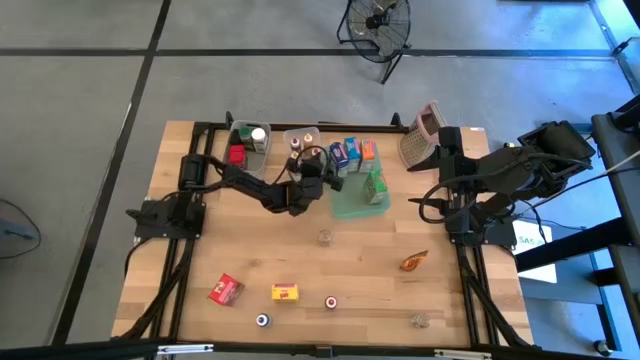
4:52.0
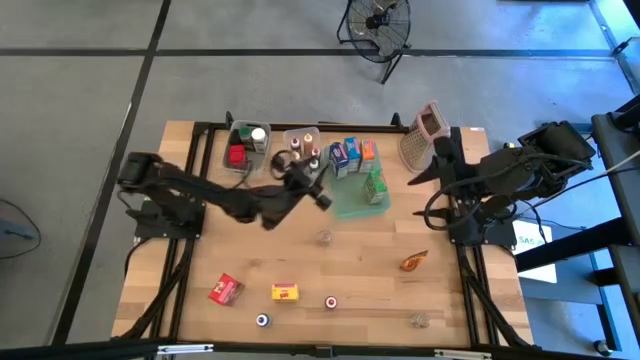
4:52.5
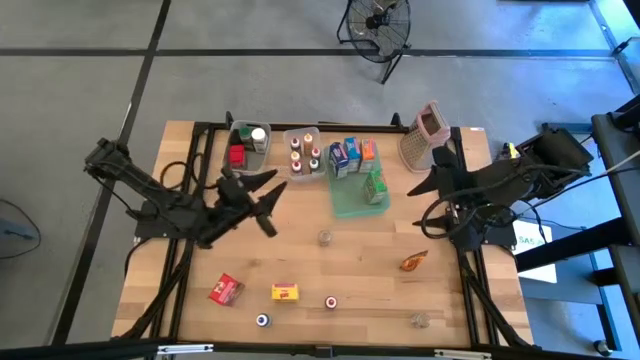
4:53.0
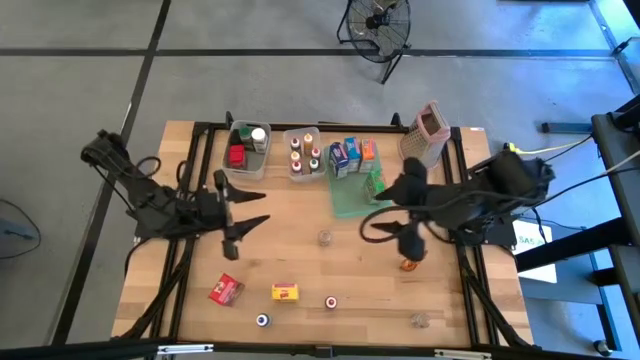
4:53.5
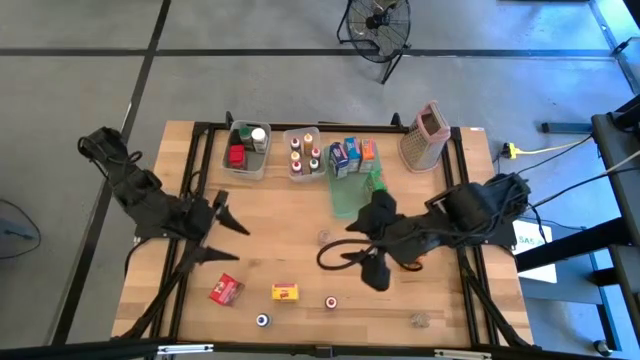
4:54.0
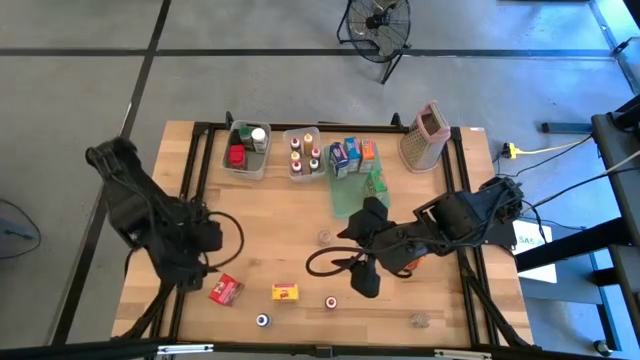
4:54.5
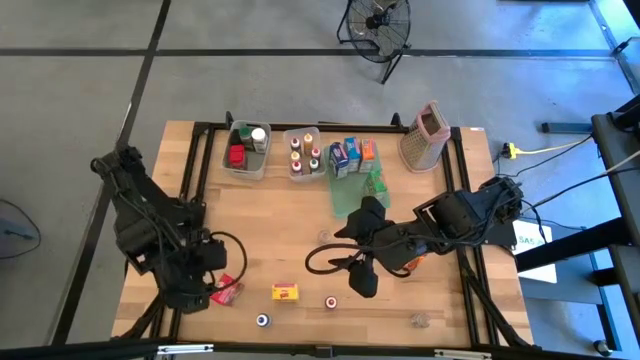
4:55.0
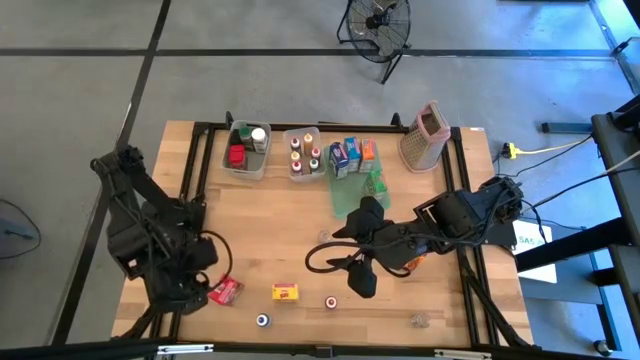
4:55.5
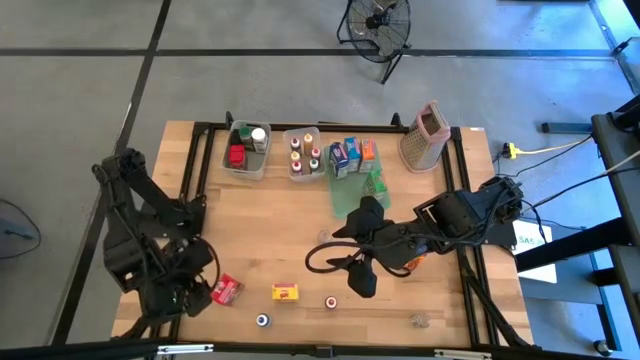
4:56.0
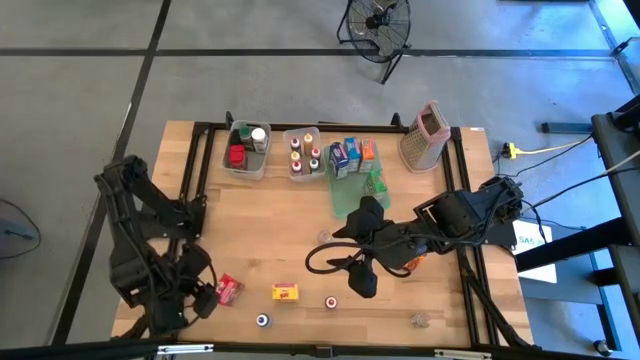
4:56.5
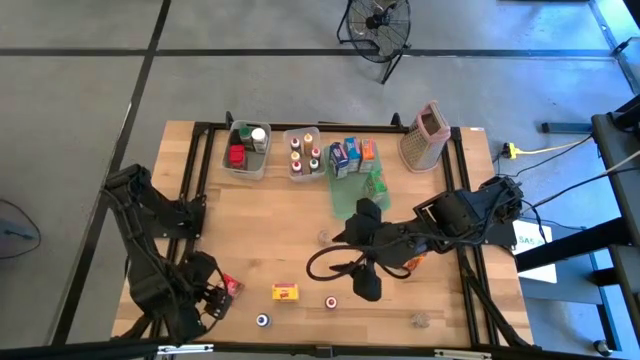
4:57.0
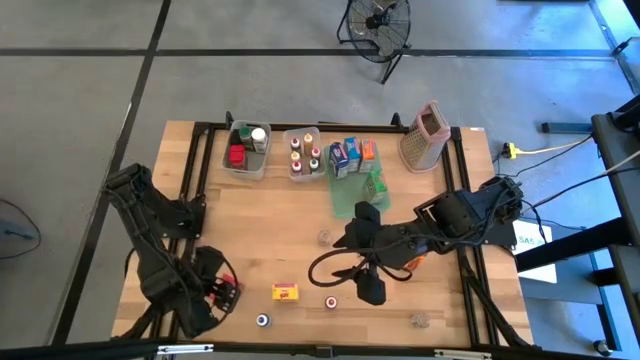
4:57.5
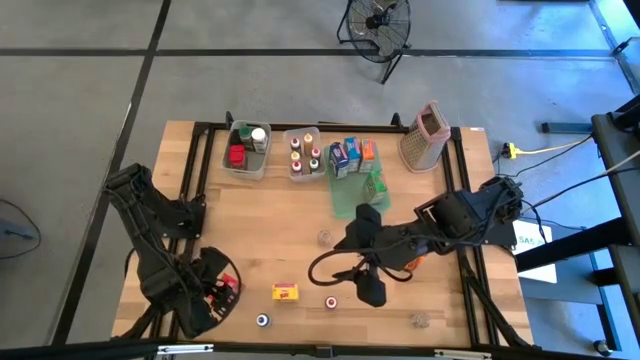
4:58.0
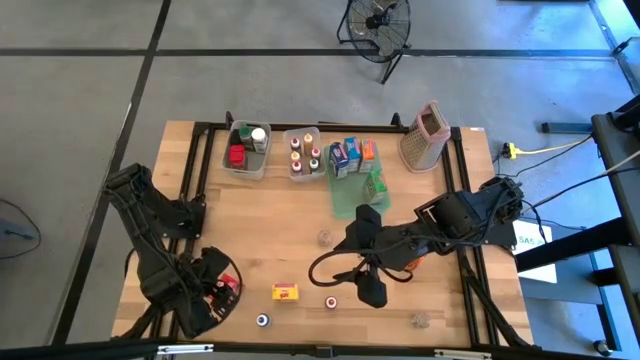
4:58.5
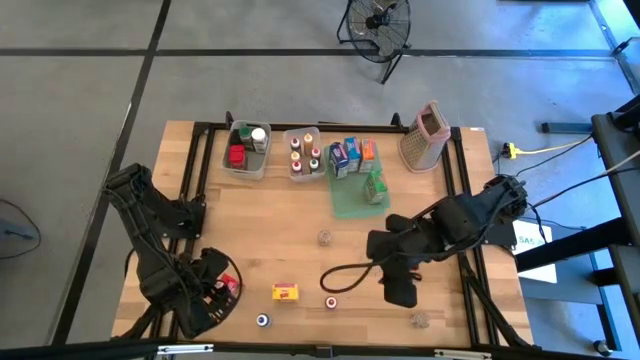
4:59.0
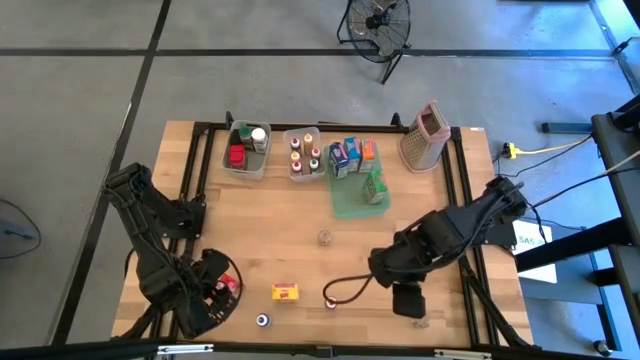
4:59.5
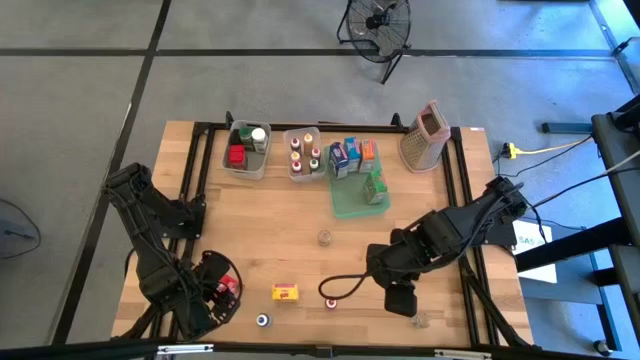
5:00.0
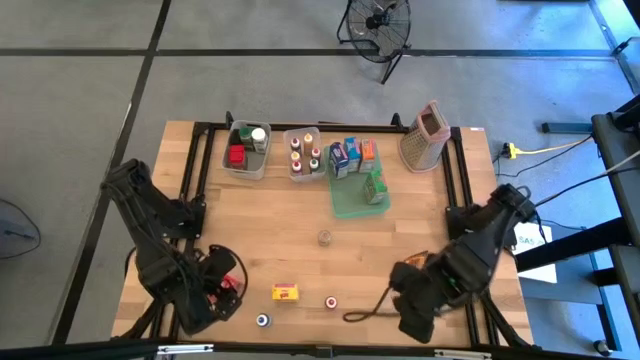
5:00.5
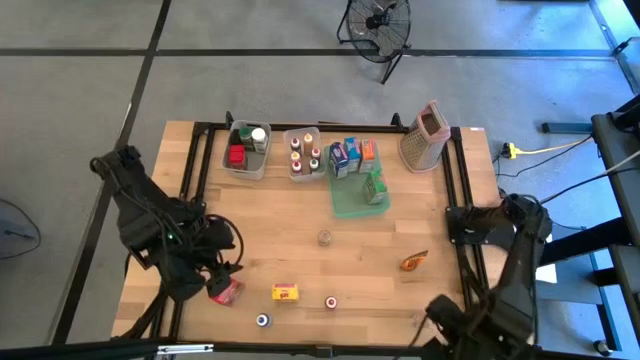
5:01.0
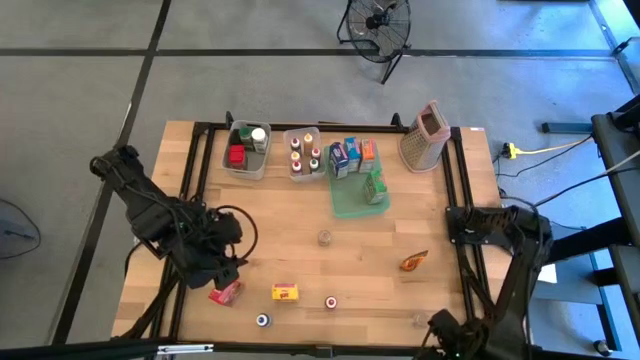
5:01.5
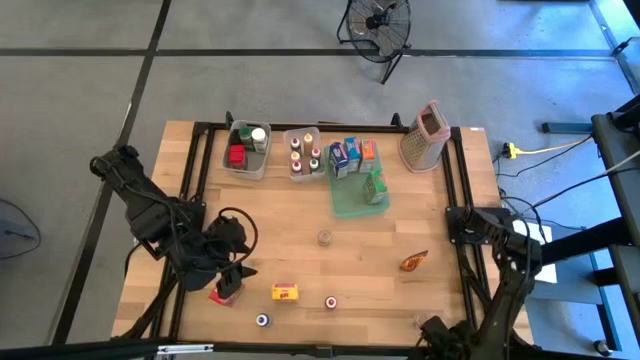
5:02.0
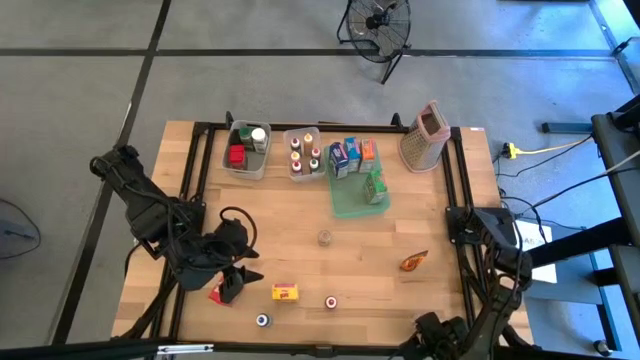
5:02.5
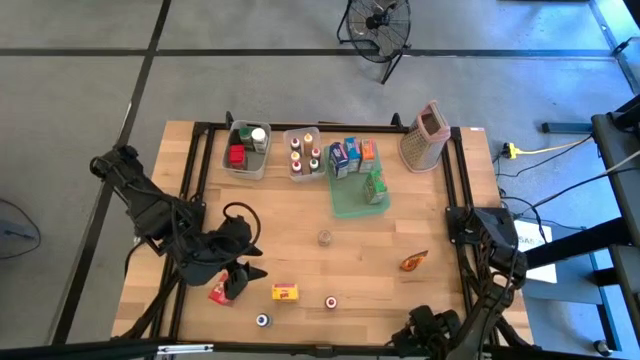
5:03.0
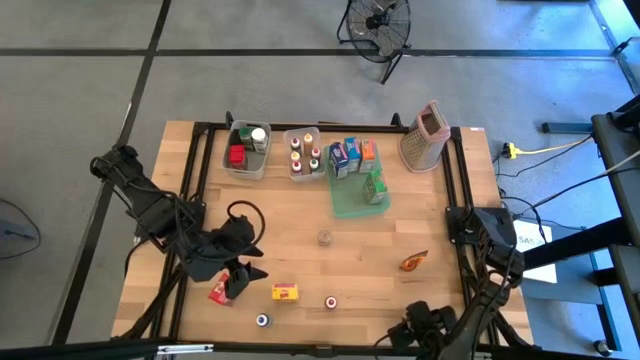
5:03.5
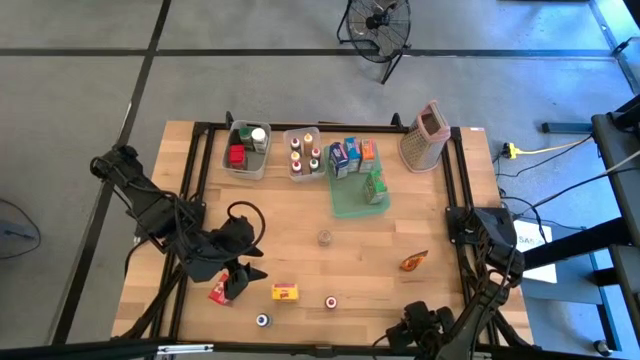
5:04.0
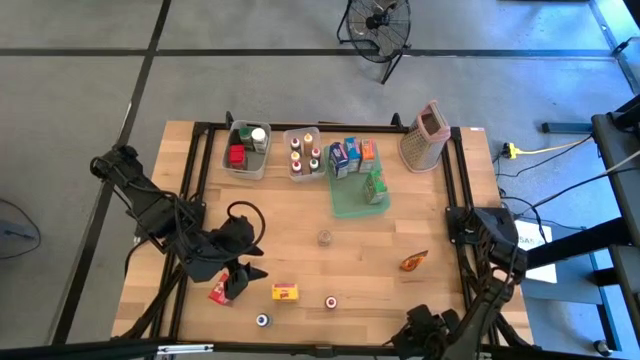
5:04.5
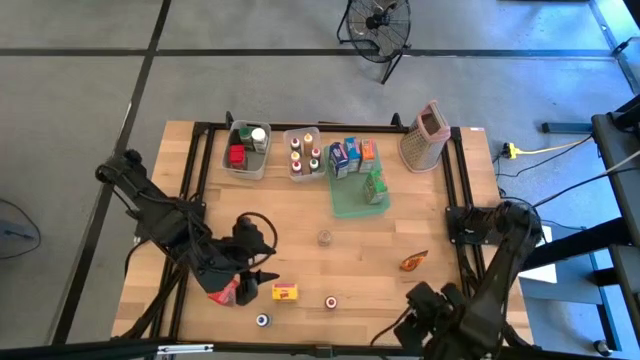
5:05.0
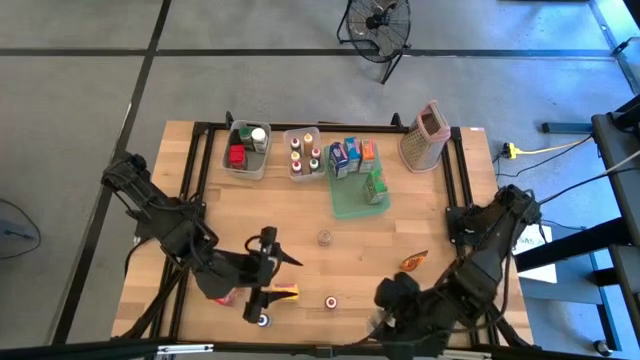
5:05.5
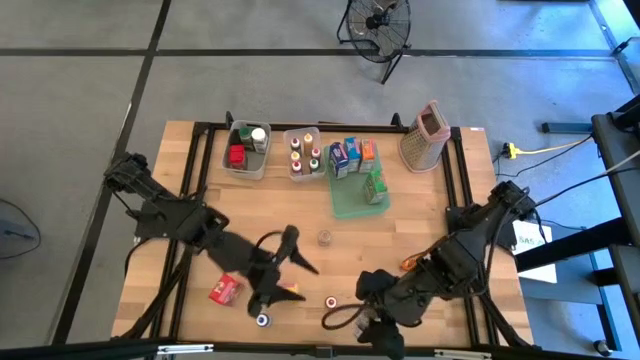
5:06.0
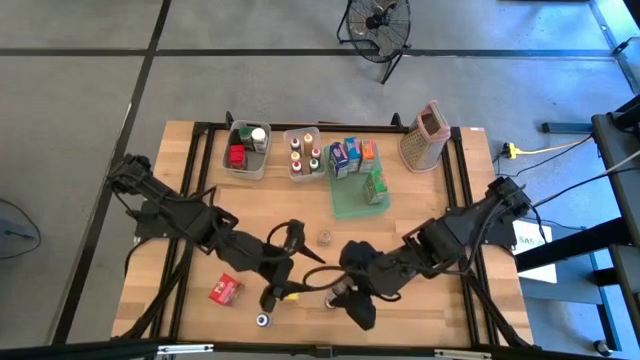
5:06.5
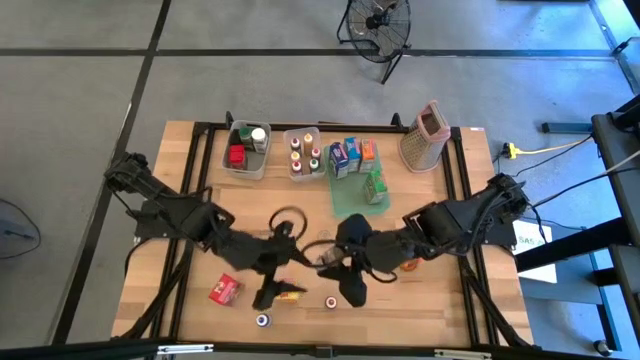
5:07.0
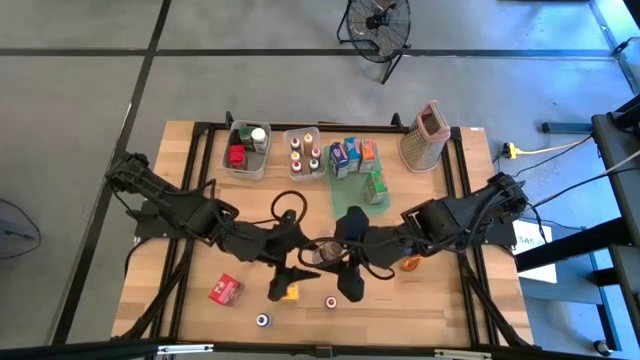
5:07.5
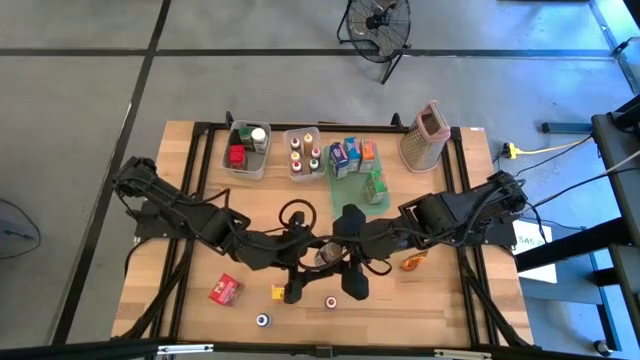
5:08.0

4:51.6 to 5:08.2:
Task: Pick & Place Kitchen Items
Put the bottom transparent spice bottle into the gray bin

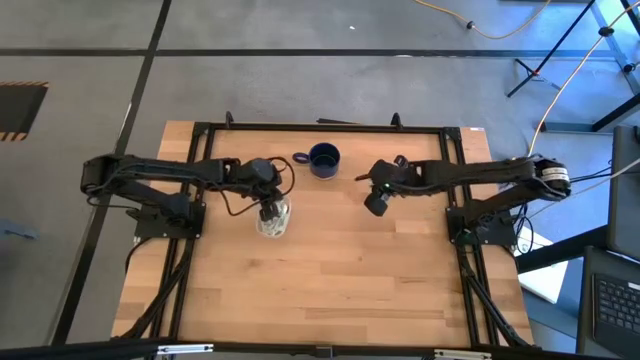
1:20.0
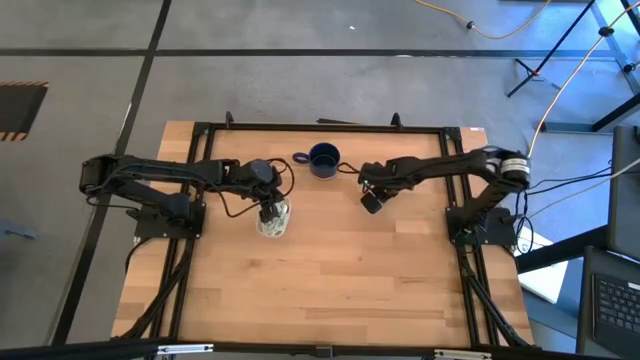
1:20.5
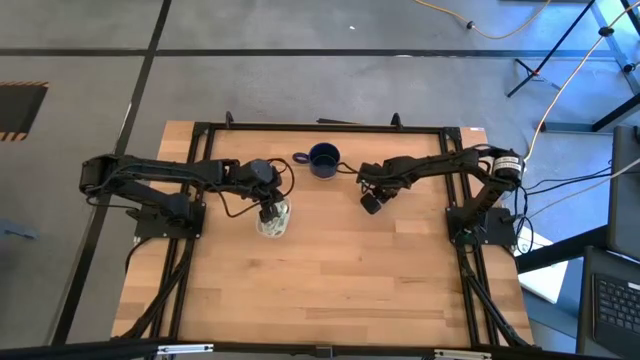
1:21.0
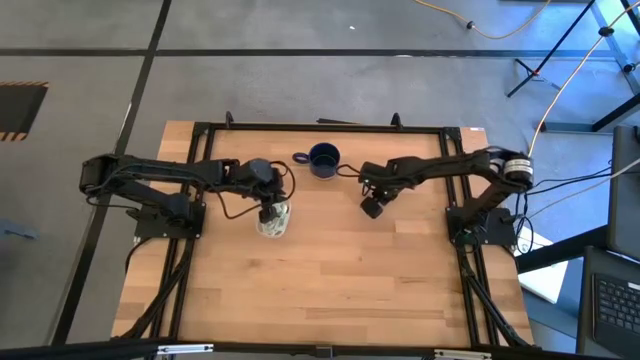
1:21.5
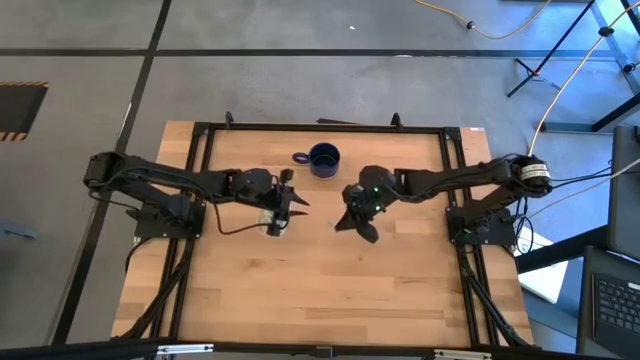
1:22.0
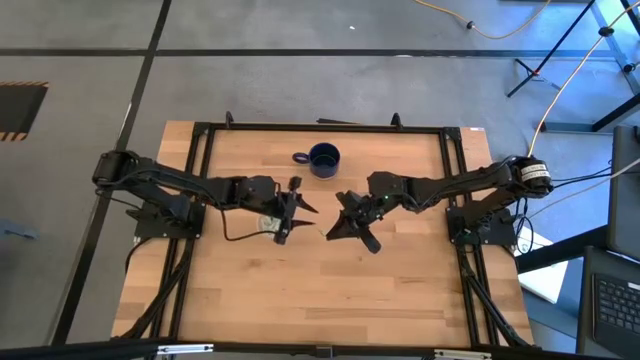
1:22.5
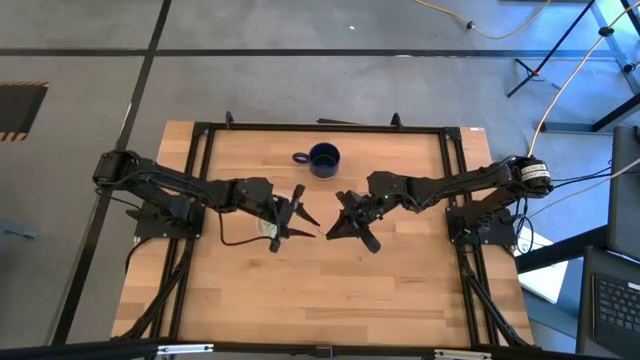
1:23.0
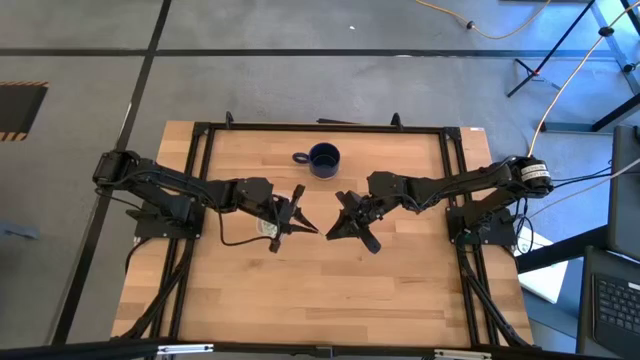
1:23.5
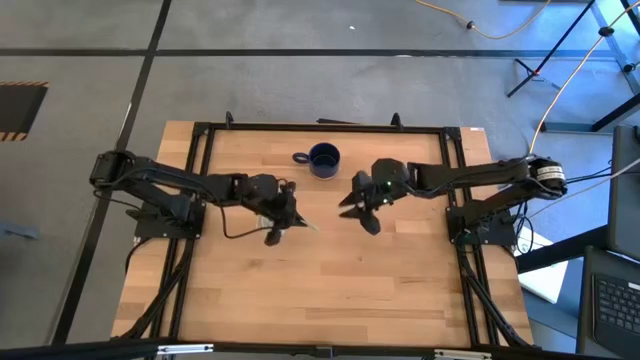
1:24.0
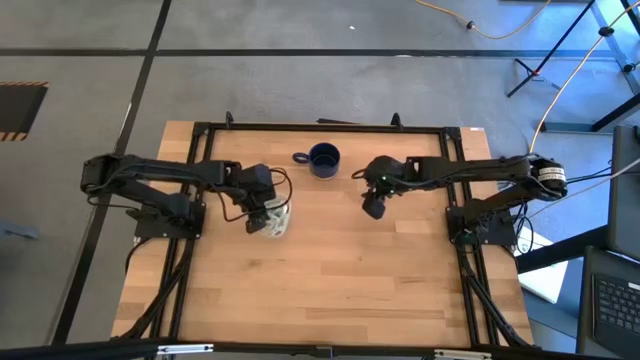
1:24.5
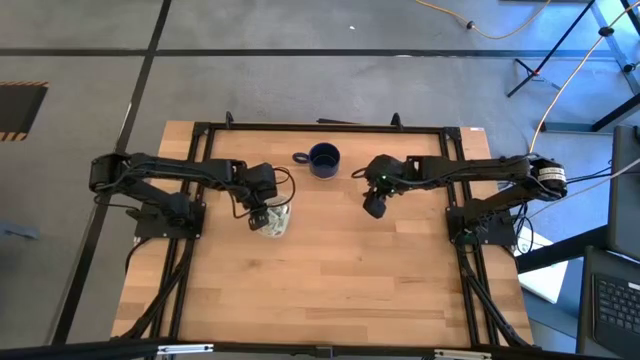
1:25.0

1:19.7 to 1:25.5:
Task: Pick and place Stevia / Truvia into bins
Put the white stevia packet into the transparent container
